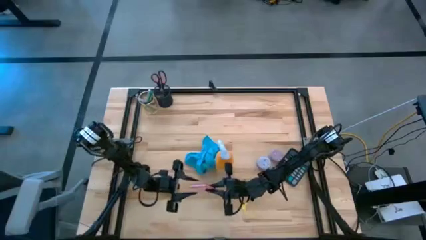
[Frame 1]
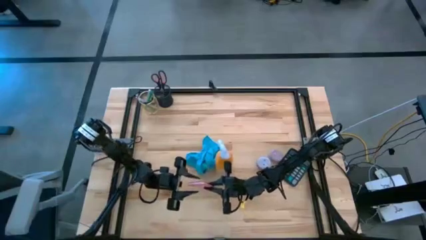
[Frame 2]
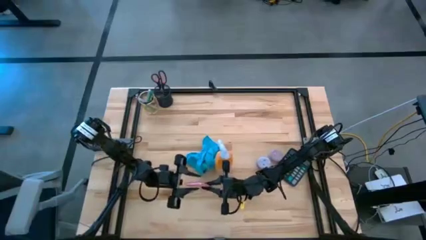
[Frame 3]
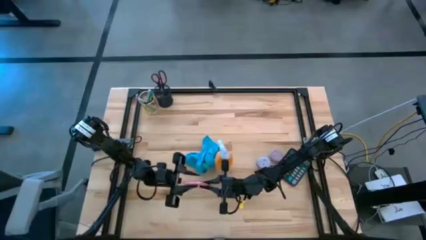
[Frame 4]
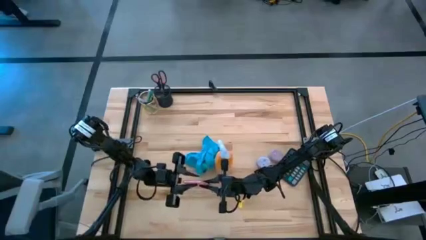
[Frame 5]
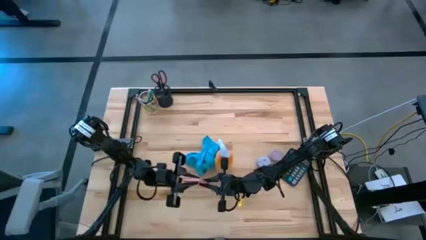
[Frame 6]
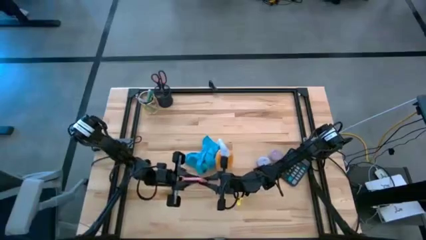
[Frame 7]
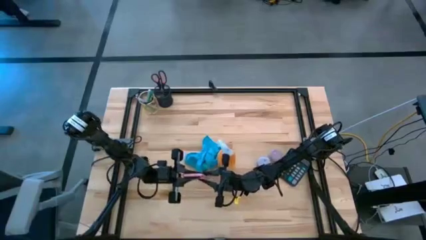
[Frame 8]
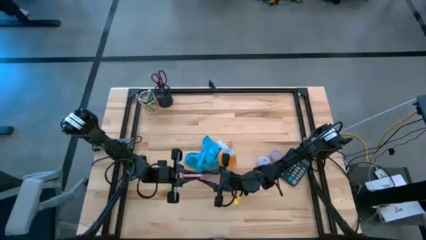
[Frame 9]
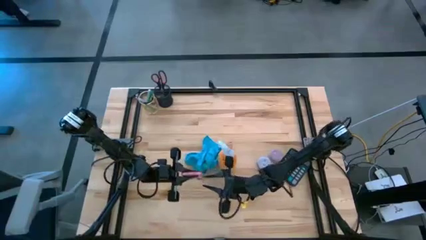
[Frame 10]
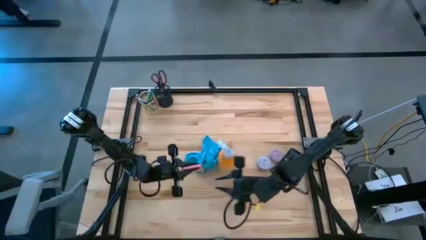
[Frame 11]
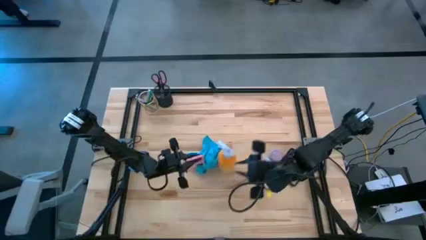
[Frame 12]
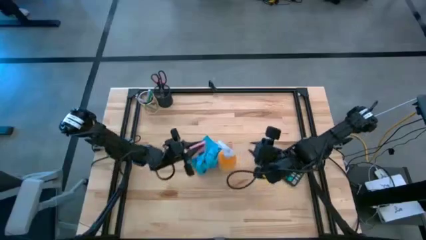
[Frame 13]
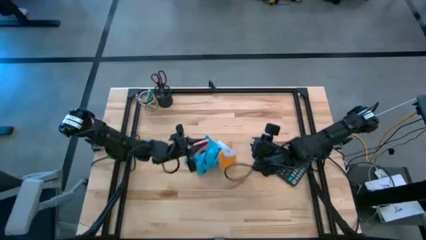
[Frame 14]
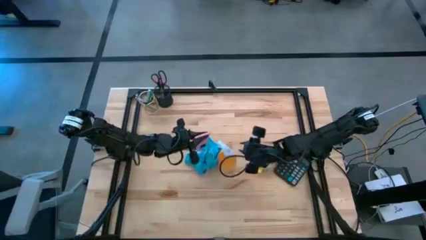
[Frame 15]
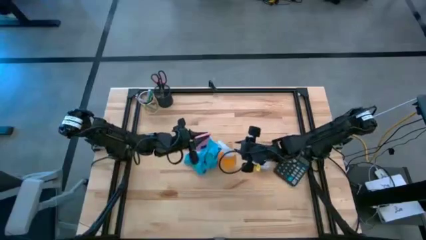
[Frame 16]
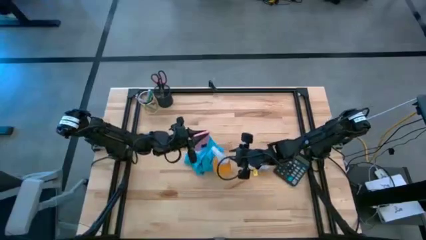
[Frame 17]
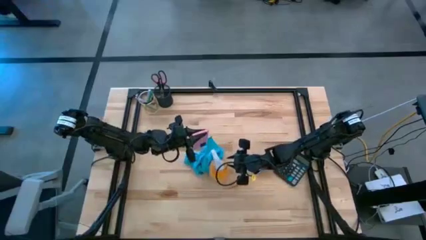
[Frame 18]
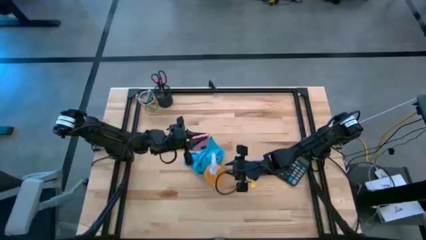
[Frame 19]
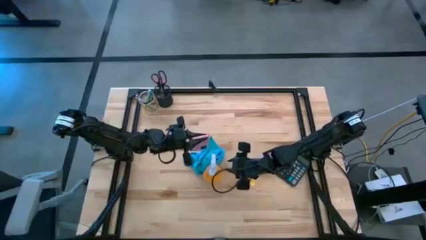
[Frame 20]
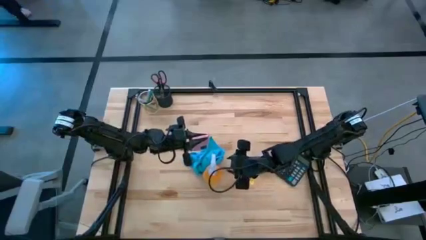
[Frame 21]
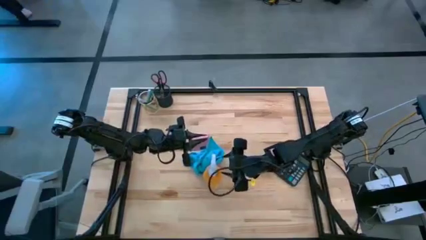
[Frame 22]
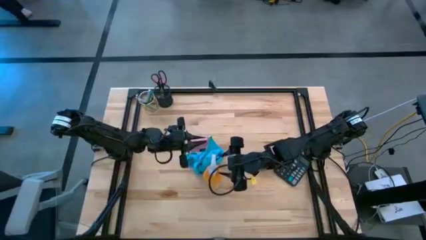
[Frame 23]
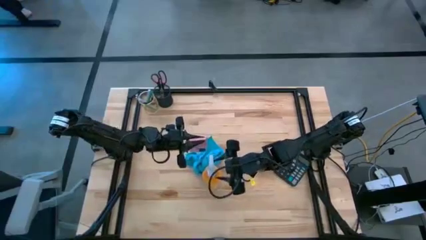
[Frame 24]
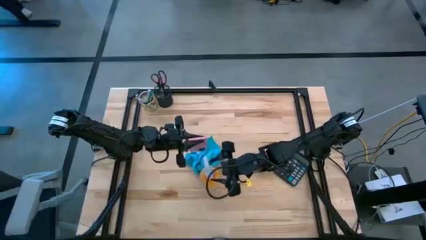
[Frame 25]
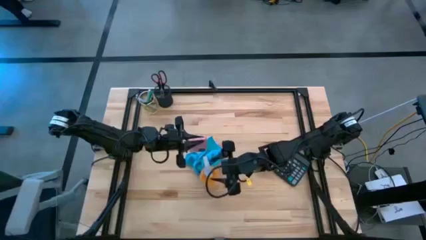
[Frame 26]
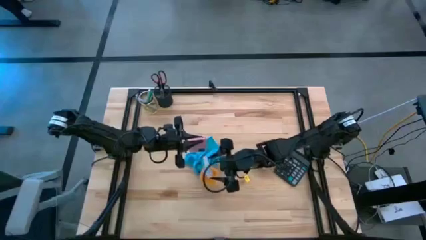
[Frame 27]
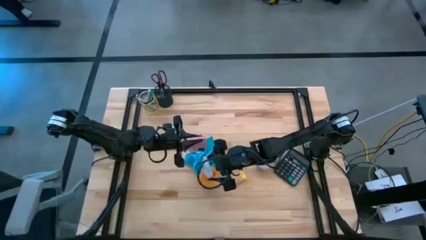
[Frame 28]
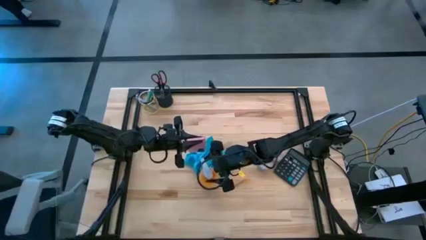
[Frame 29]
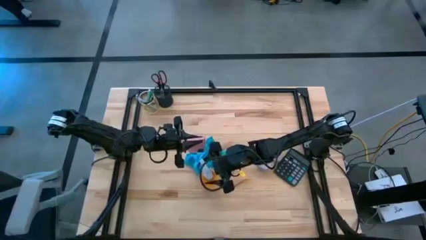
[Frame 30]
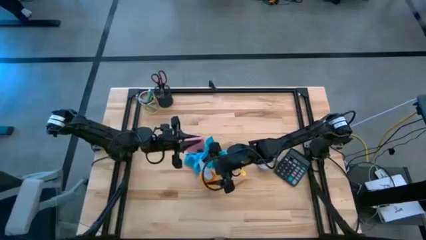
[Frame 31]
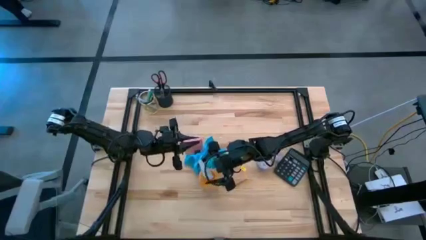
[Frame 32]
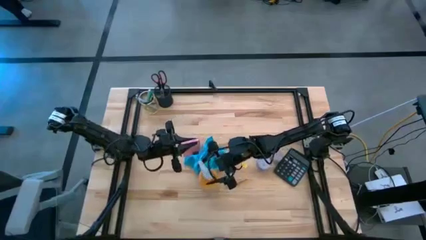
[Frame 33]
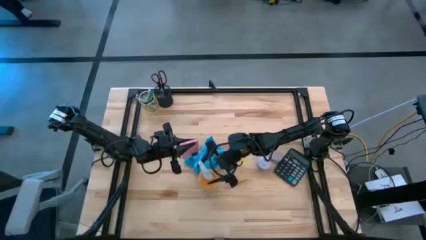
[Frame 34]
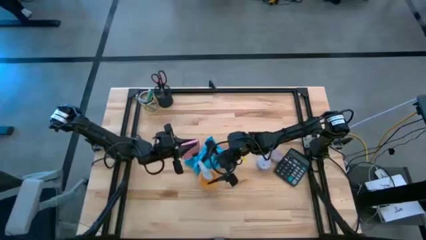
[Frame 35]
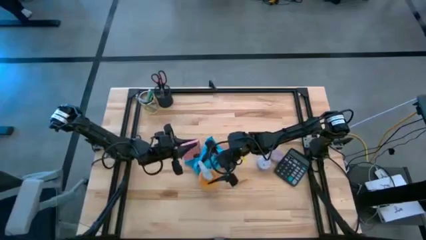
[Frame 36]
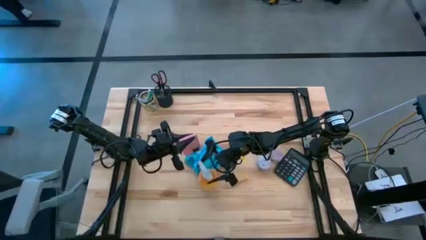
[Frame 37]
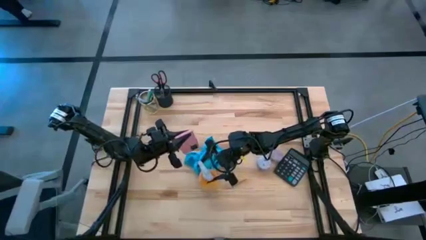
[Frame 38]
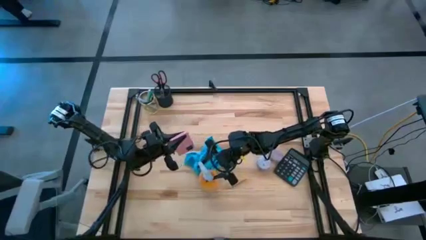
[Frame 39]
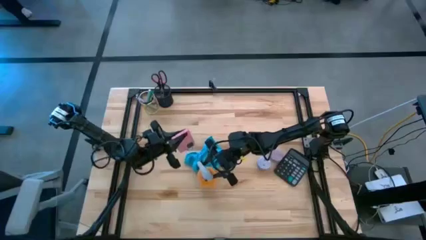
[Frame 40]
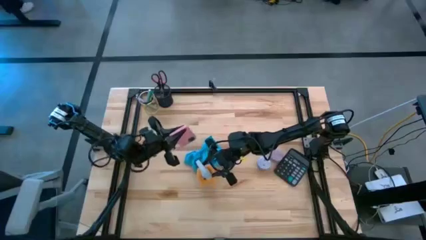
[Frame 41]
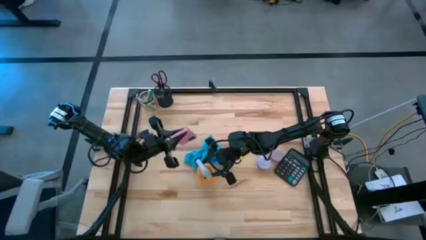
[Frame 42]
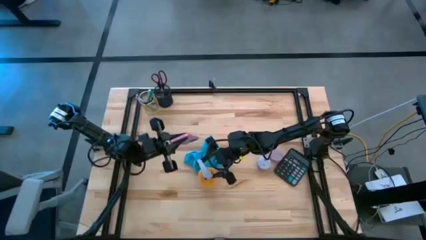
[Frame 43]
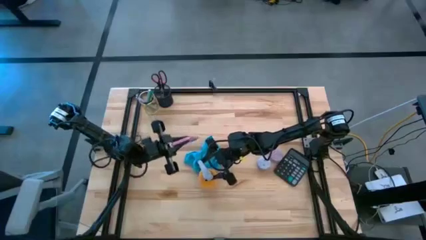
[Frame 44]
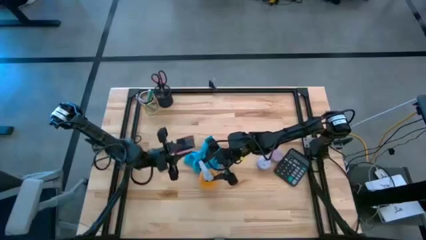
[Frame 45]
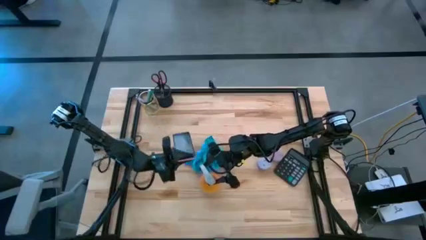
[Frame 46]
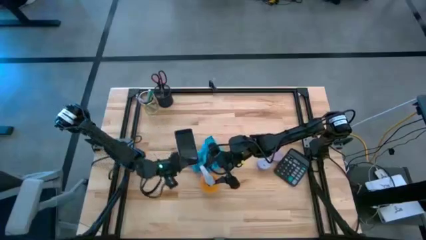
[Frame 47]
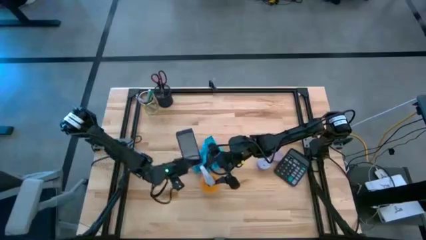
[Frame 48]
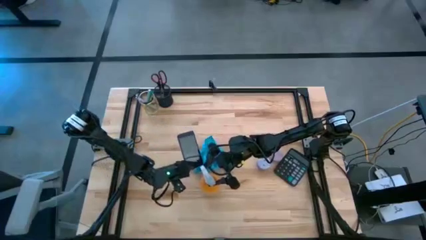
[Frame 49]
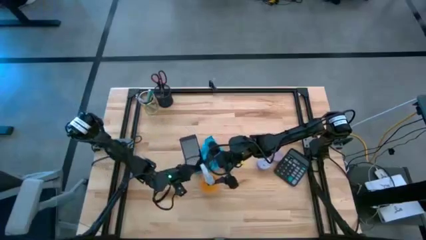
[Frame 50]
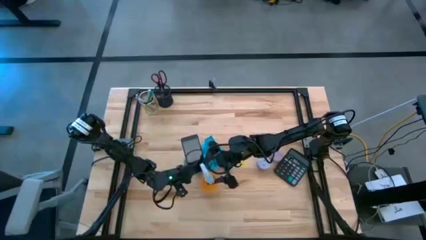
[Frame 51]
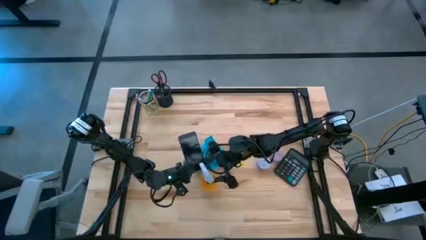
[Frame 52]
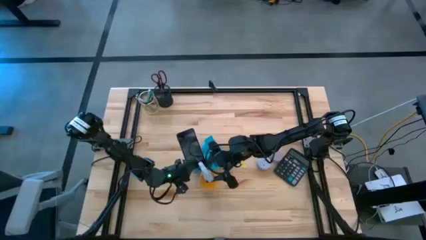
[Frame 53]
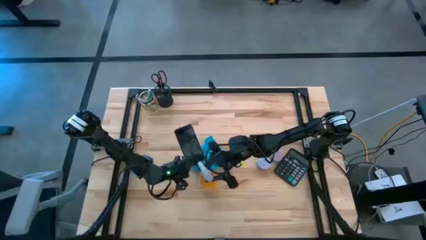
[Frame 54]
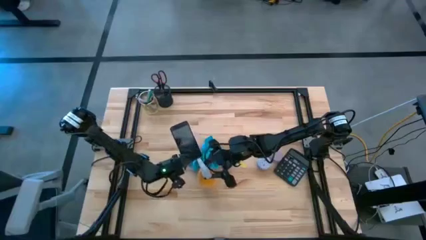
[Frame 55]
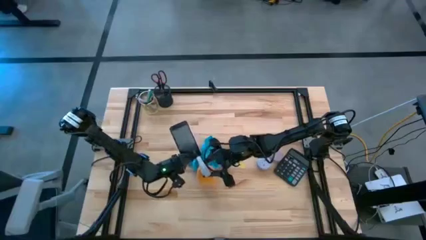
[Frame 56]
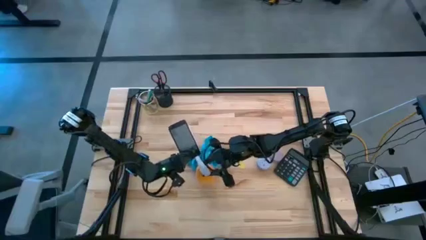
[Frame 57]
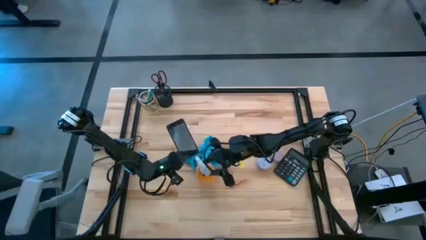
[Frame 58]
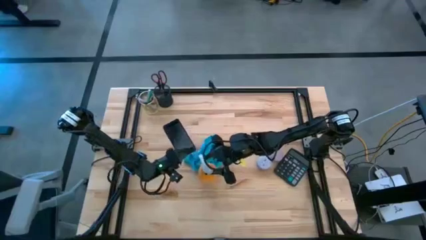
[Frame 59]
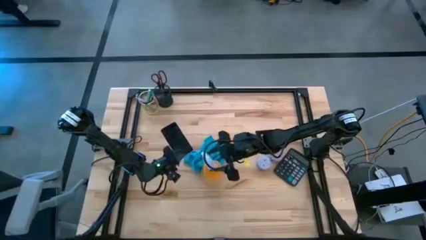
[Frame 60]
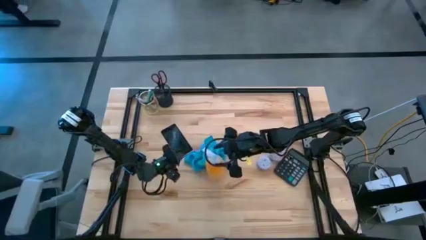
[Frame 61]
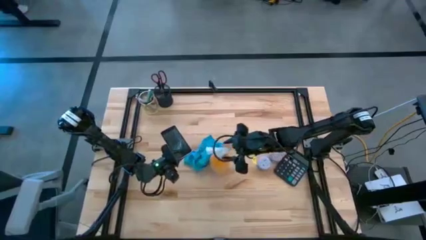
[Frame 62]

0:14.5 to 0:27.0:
Task: Apply microfiber cloth
Spray the cellphone on the front and back using the spray bottle

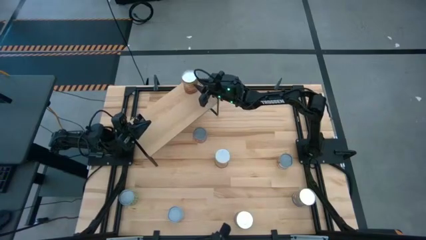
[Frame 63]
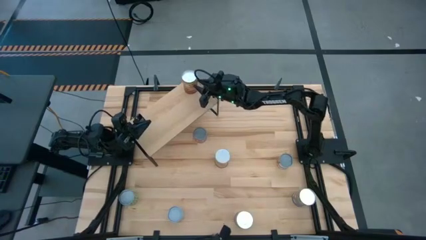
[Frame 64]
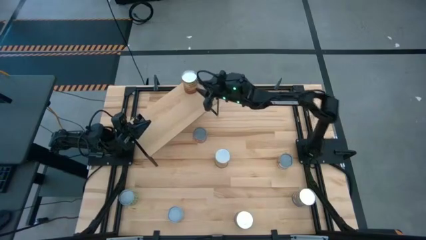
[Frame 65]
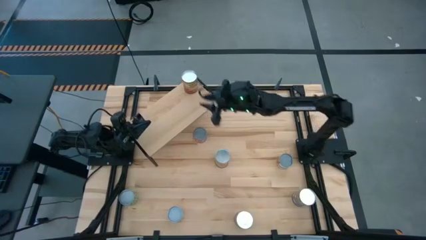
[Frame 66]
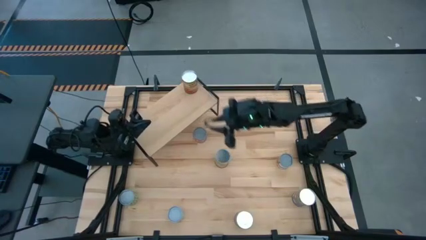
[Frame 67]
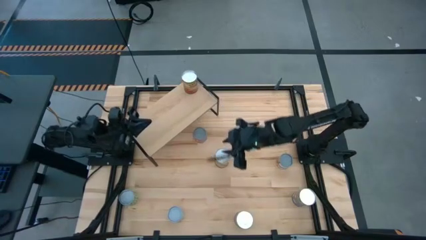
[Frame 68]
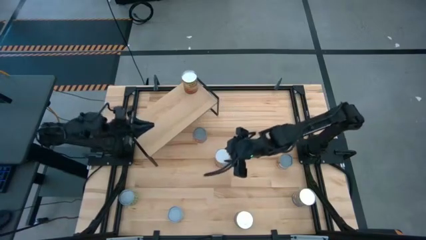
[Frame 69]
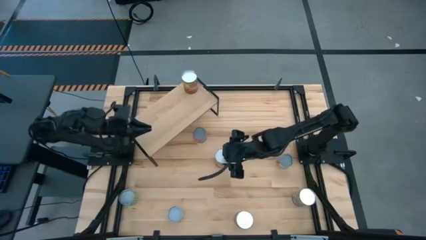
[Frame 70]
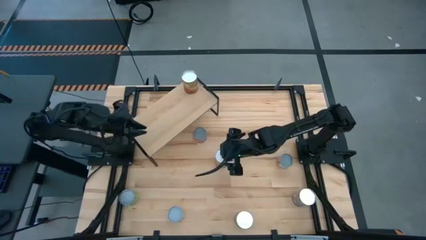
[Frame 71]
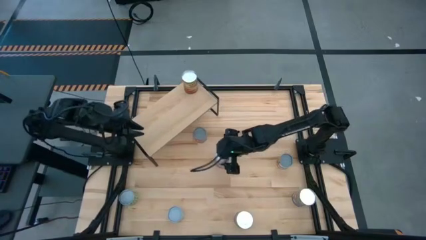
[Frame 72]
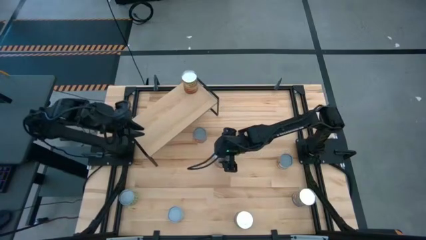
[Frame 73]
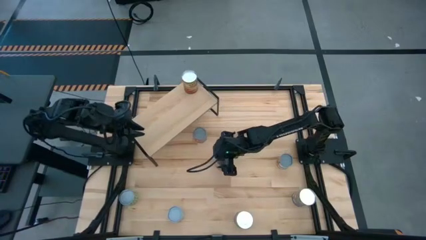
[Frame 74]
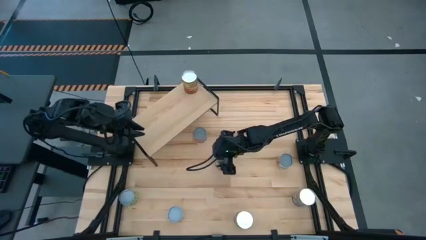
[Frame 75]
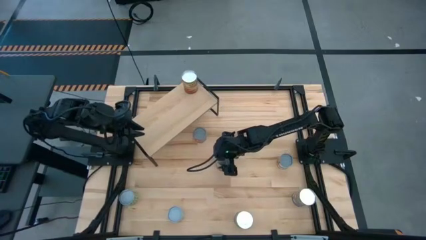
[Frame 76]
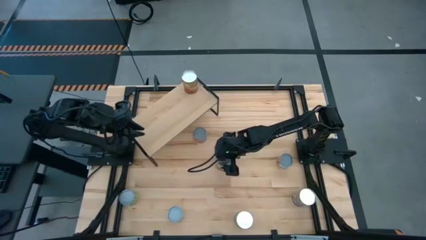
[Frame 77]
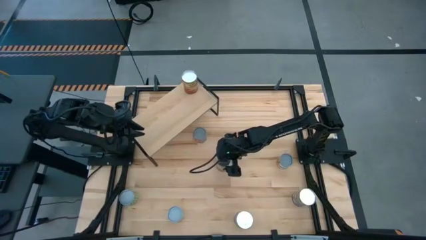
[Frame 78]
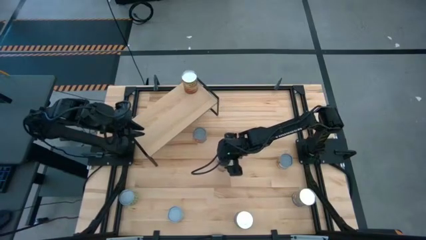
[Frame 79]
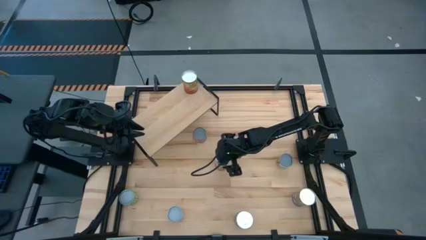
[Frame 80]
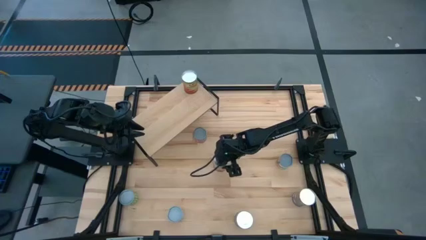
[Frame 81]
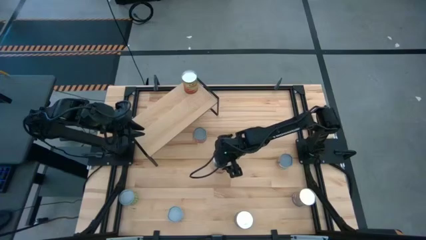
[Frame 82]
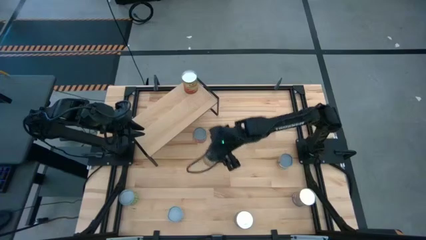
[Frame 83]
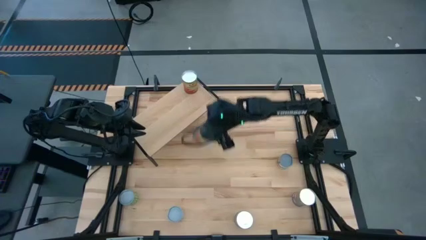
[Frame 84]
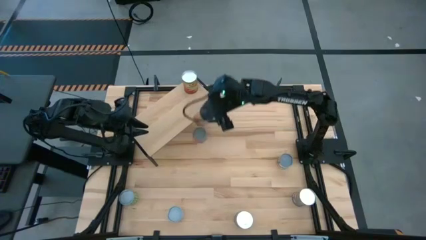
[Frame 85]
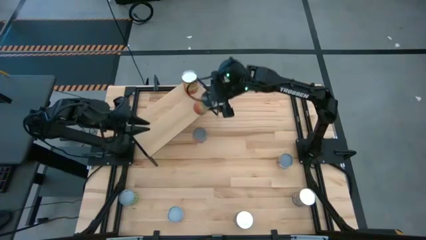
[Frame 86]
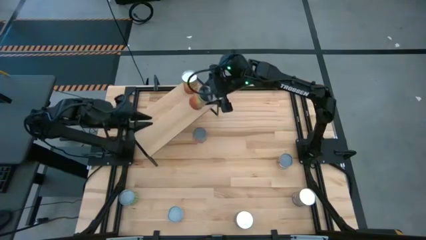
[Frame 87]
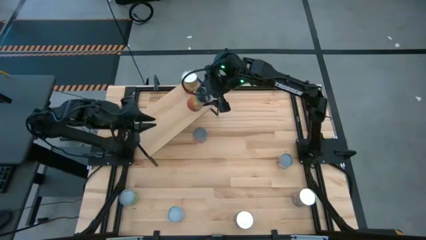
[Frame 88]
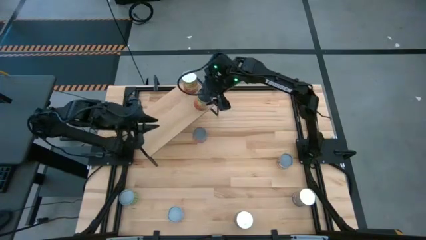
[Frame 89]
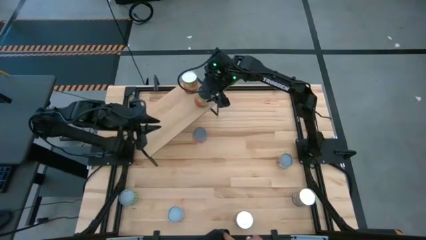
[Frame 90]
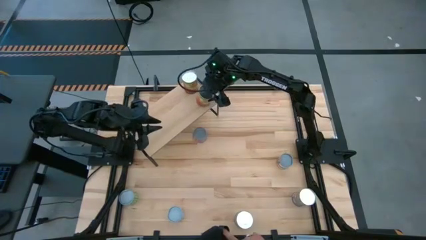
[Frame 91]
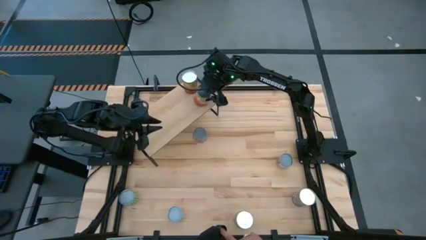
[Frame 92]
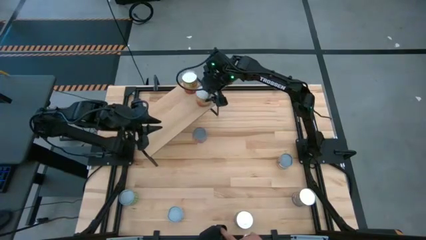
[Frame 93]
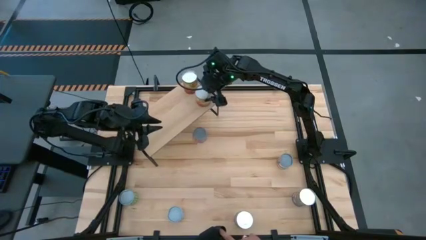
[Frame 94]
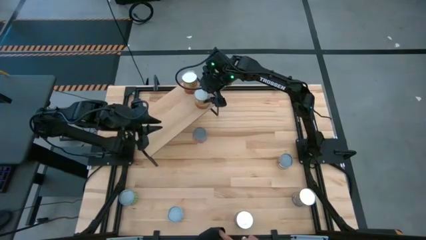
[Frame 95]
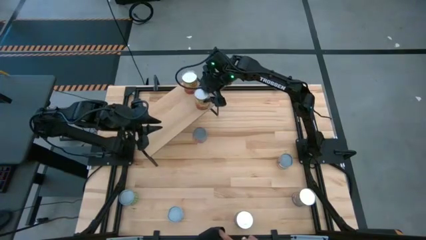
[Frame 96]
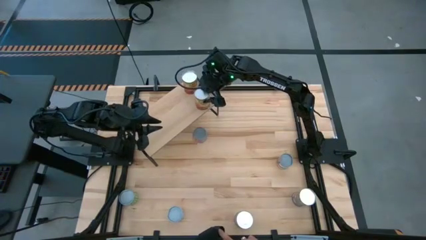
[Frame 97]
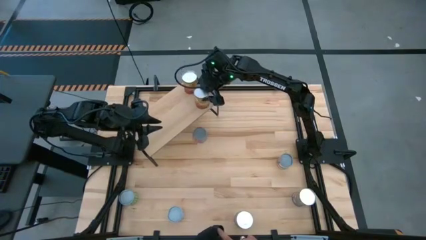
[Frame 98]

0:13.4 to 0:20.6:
Task: Pick and place cans onto a shelf
Put the large canned corn on the shelf
